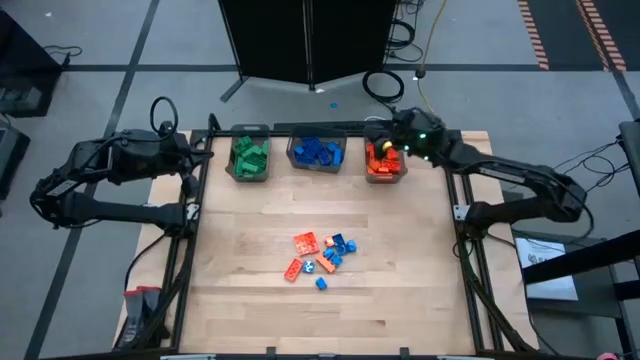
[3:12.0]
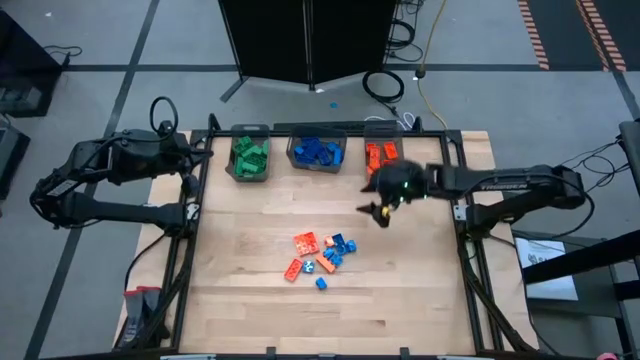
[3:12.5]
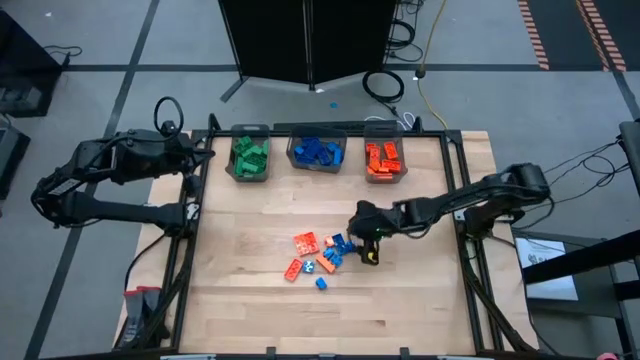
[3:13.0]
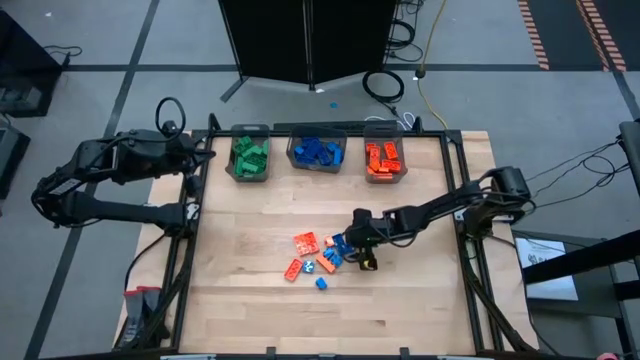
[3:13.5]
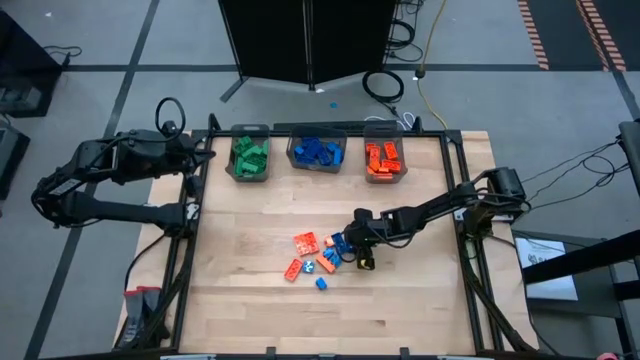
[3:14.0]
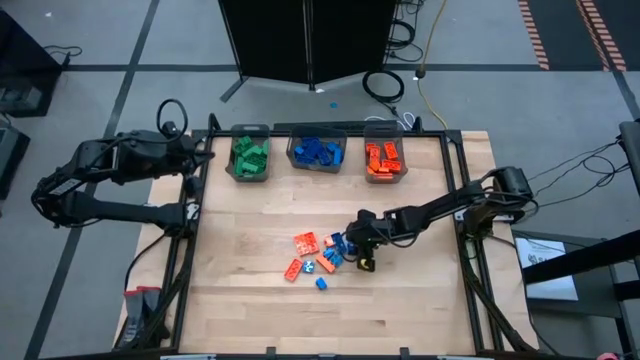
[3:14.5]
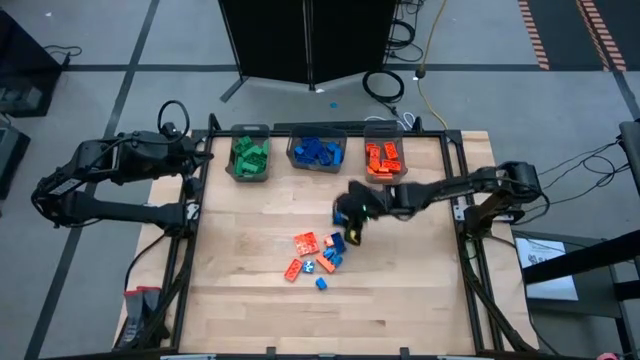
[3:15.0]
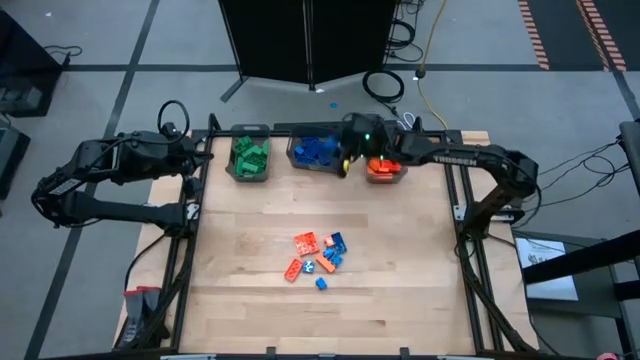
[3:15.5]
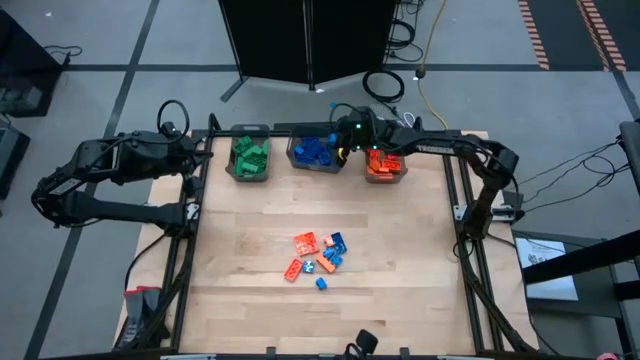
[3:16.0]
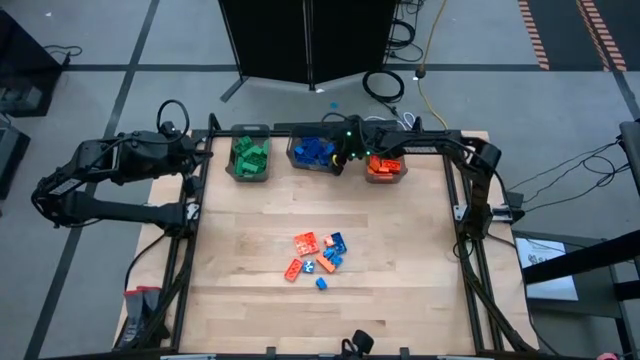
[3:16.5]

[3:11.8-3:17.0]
Task: Sort blocks
Put the blue game piece into the middle black bin

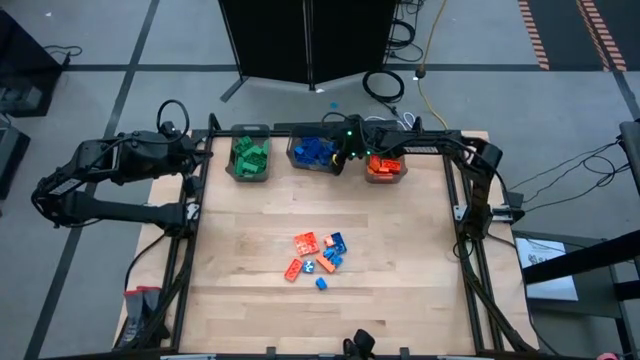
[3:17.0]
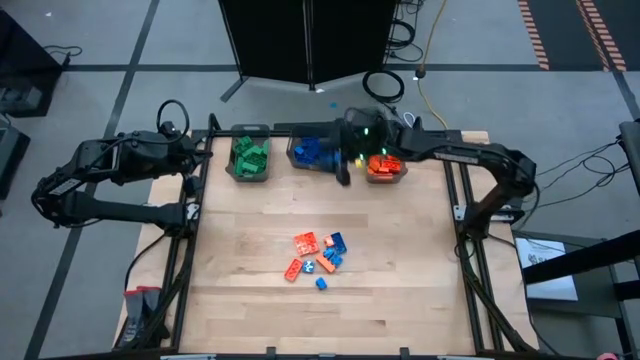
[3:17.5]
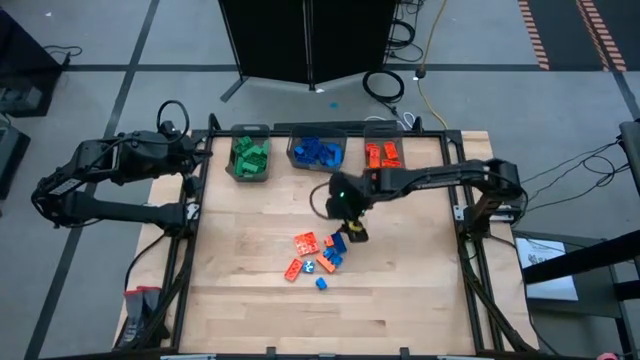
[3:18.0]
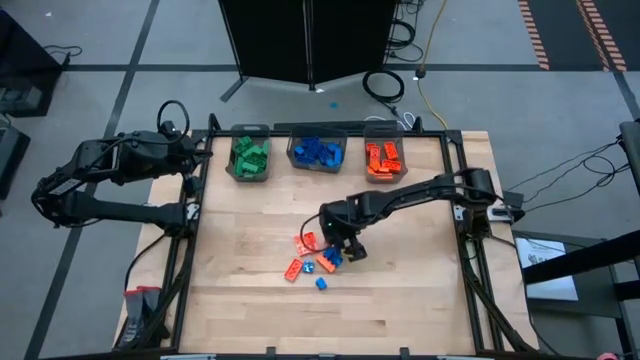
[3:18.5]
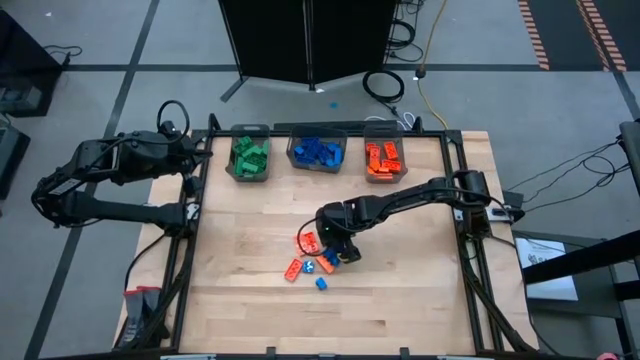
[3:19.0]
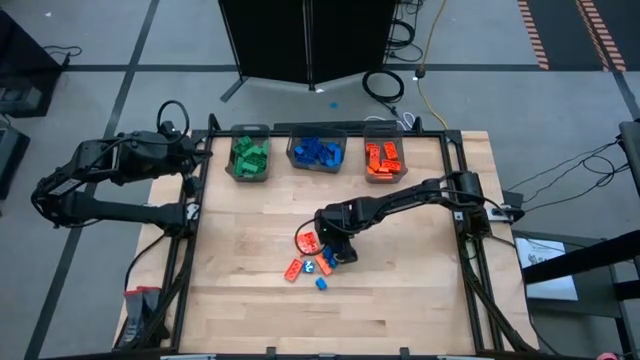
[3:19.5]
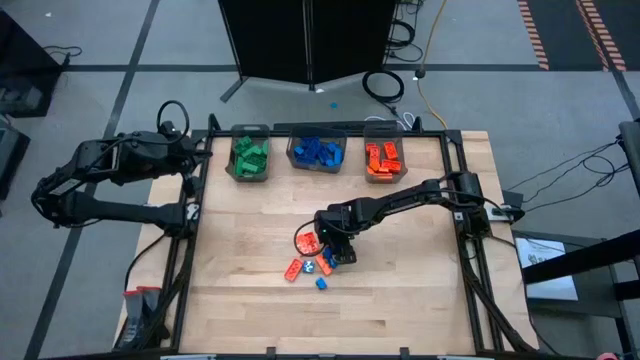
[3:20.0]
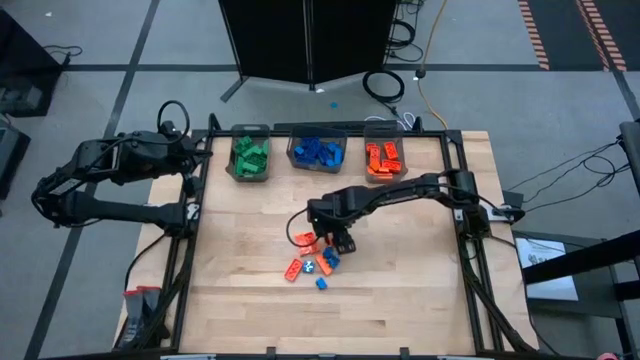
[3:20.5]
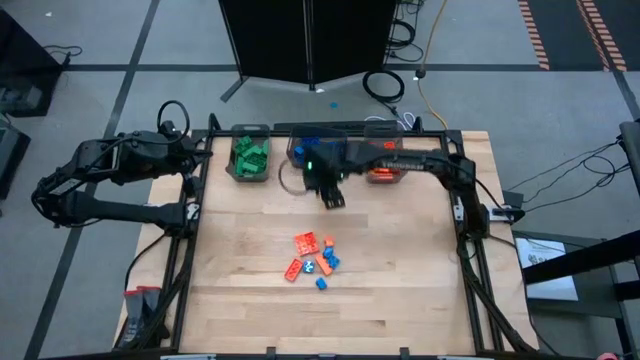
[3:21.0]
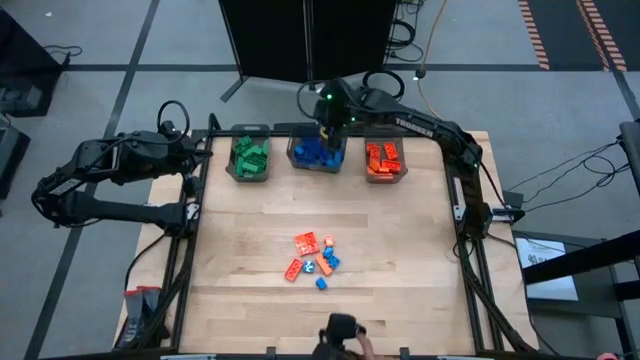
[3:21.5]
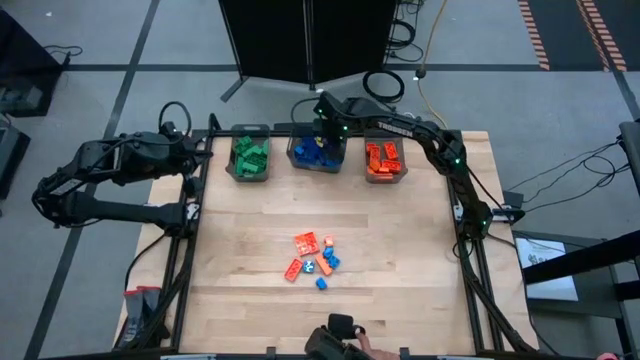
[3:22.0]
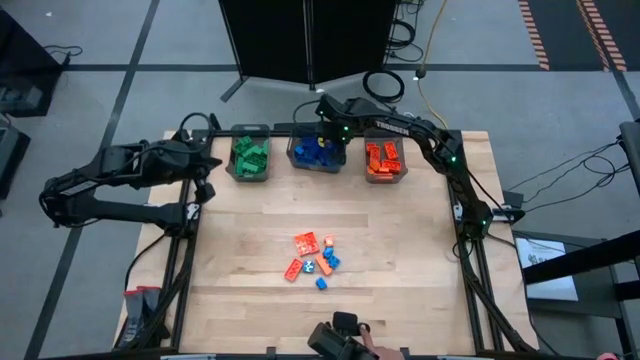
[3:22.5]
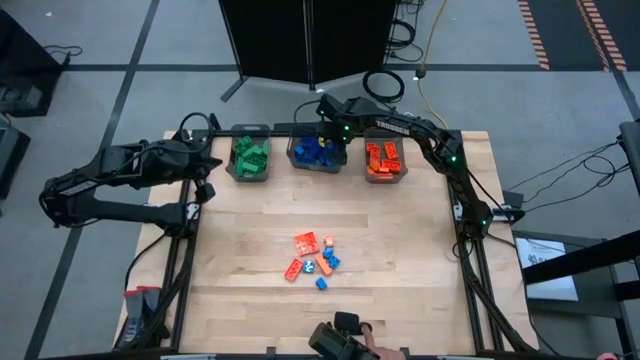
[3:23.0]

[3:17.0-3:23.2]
Put the blue game piece into the middle black bin

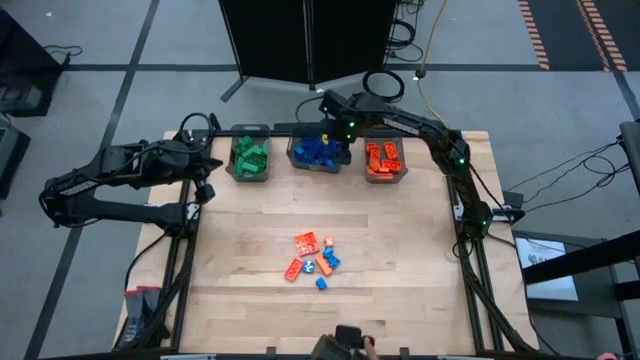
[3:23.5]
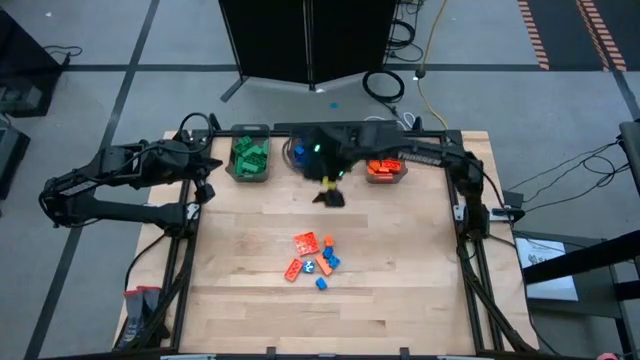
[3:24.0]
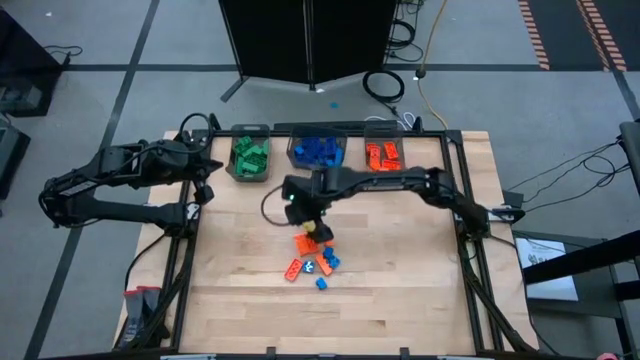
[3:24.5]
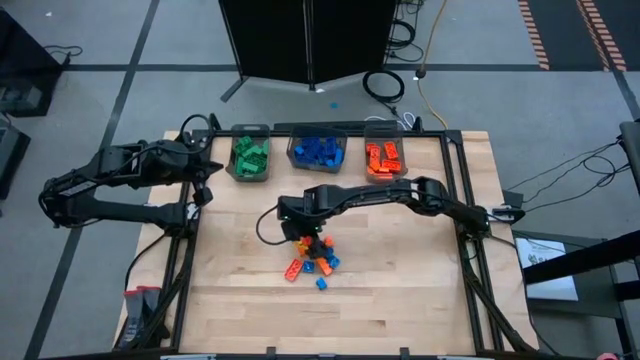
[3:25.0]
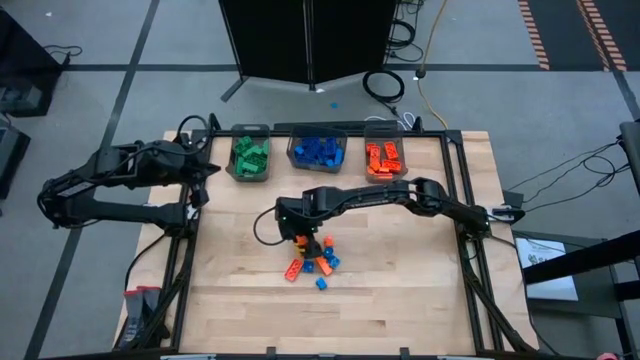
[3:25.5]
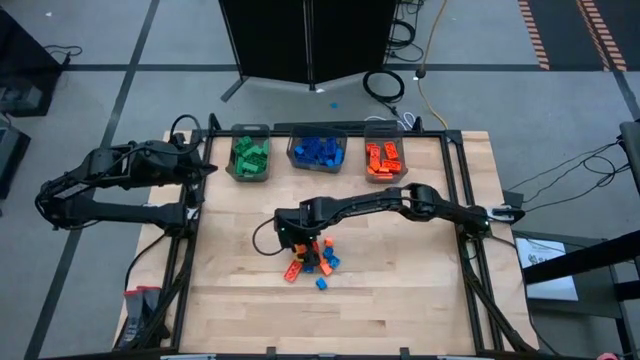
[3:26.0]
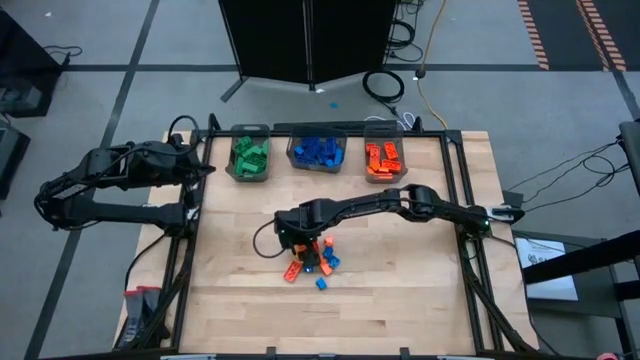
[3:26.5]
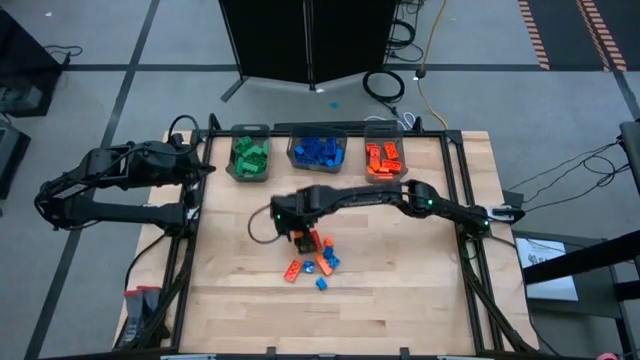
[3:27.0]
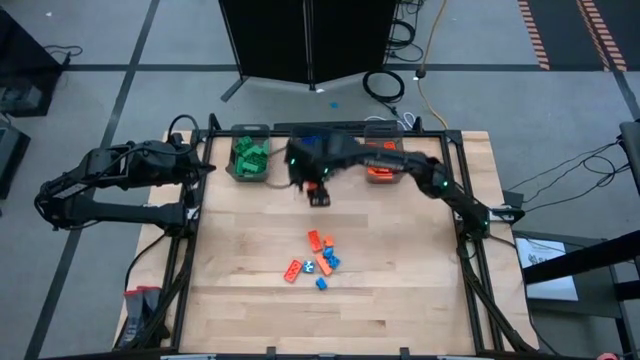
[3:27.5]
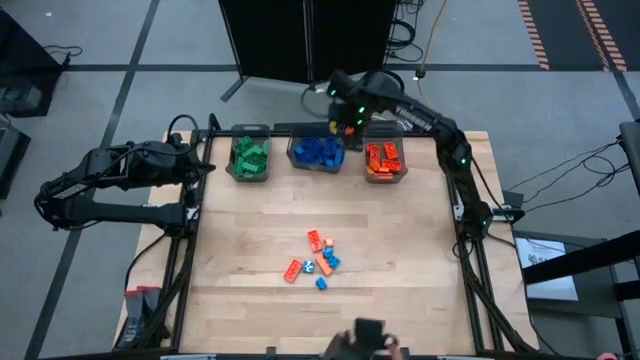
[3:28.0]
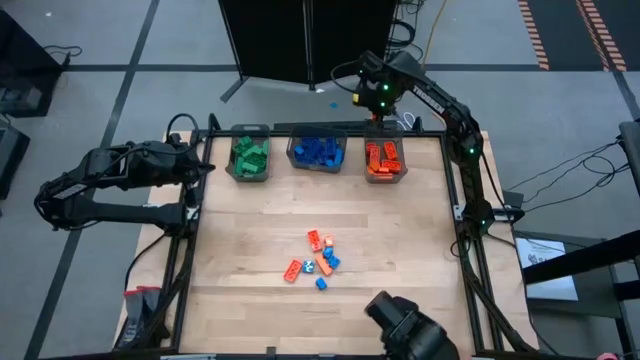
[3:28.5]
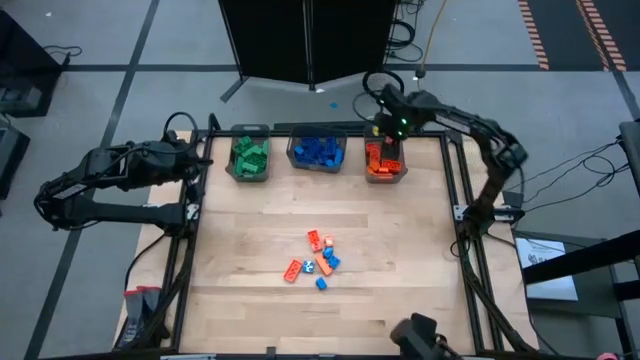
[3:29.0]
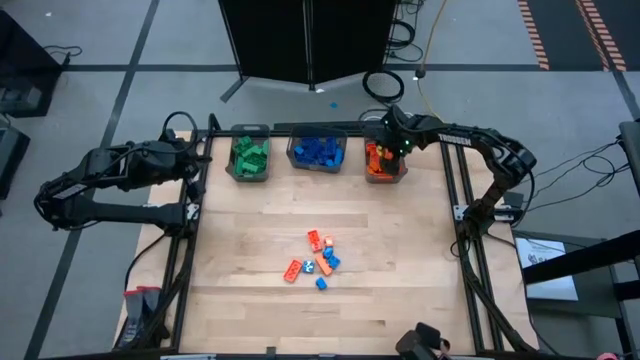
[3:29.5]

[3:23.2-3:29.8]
Put the orange game piece into the right black bin

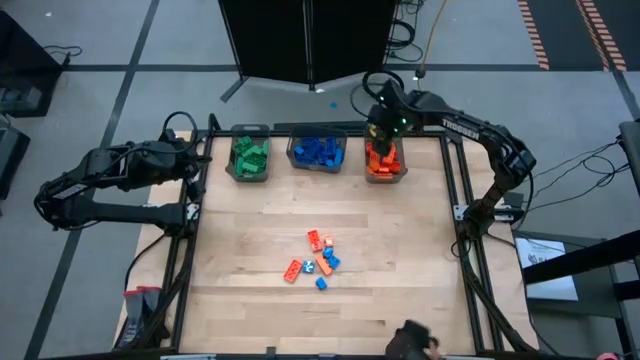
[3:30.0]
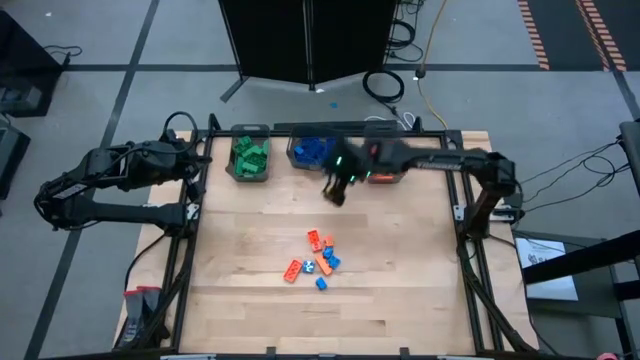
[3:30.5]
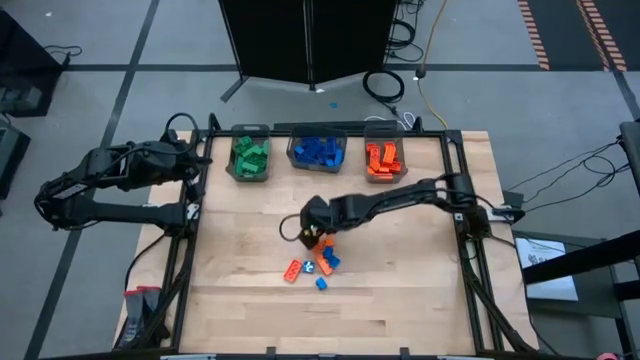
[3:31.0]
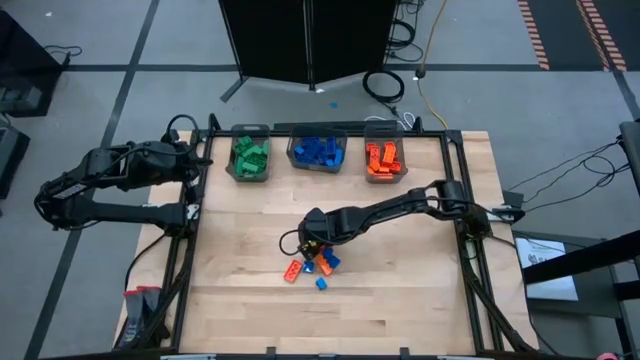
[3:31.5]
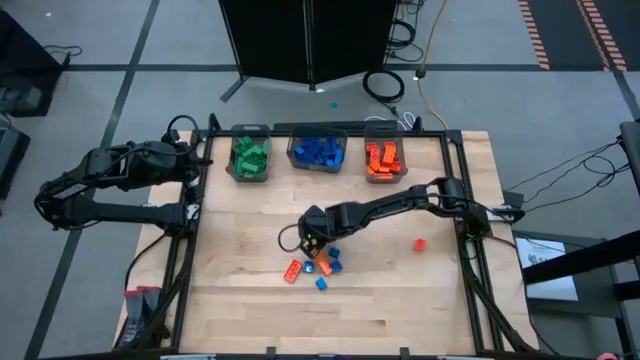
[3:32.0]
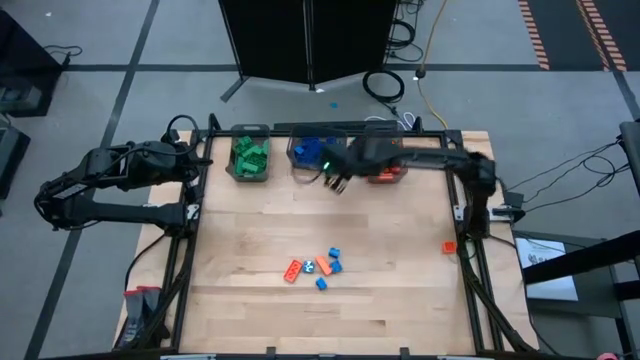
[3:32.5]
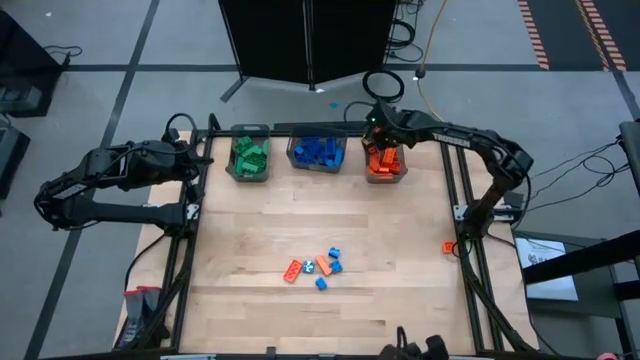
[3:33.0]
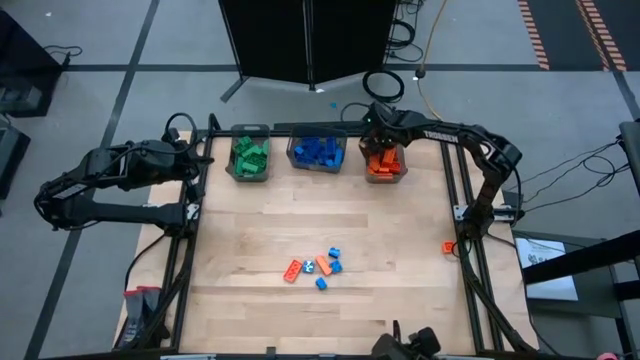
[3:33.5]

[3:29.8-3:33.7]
Put the orange game piece into the right black bin
